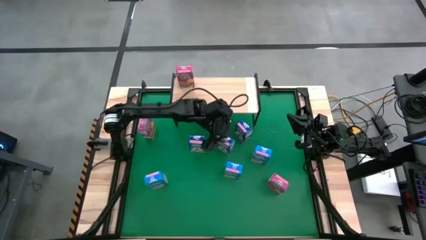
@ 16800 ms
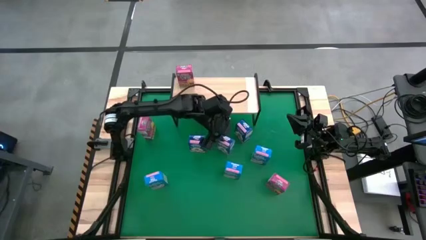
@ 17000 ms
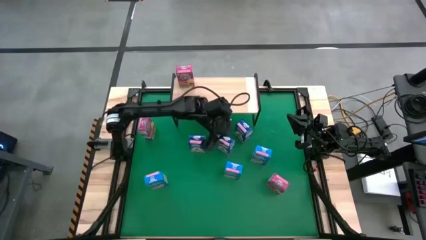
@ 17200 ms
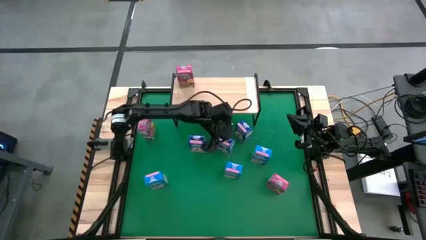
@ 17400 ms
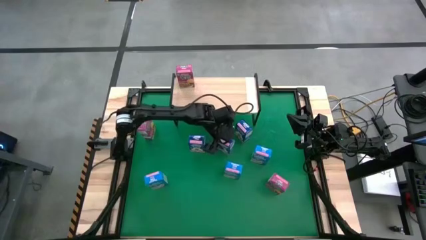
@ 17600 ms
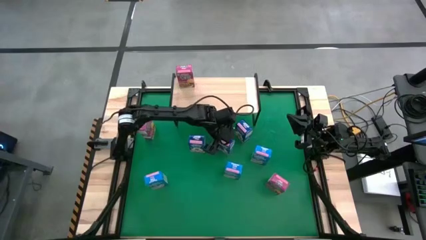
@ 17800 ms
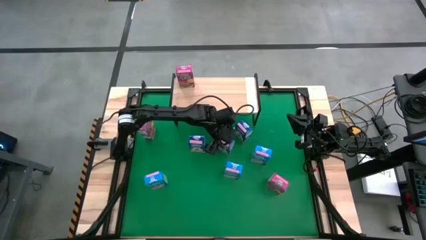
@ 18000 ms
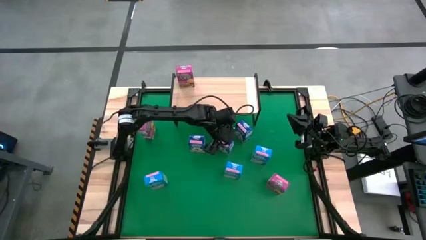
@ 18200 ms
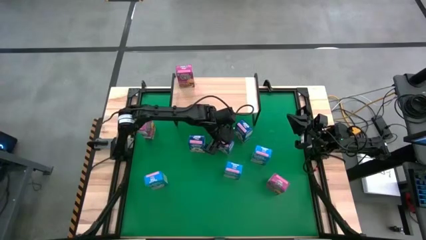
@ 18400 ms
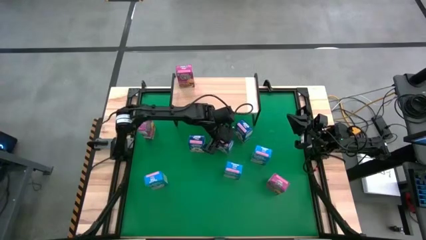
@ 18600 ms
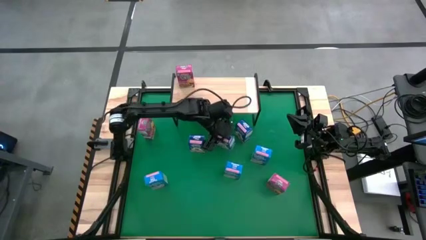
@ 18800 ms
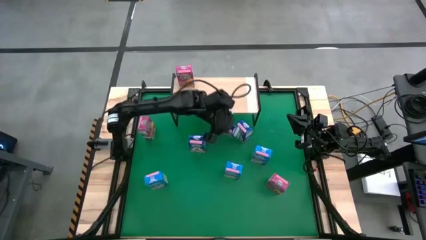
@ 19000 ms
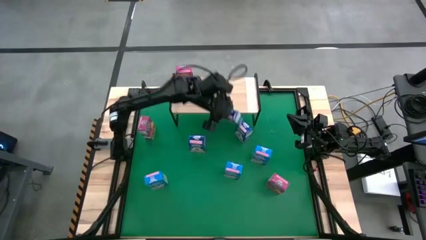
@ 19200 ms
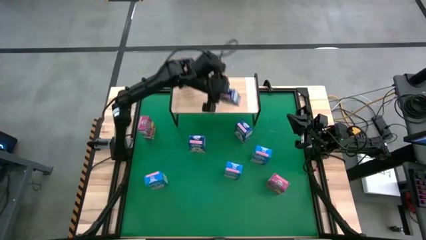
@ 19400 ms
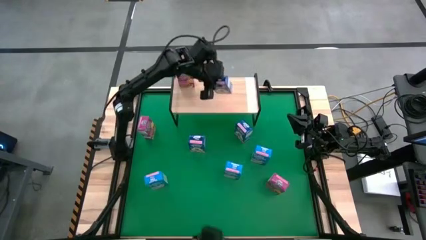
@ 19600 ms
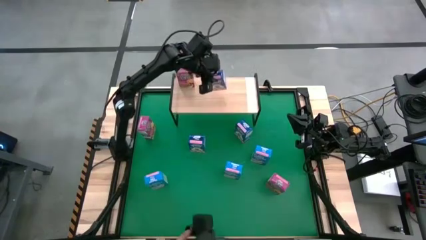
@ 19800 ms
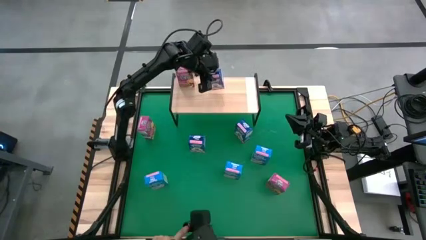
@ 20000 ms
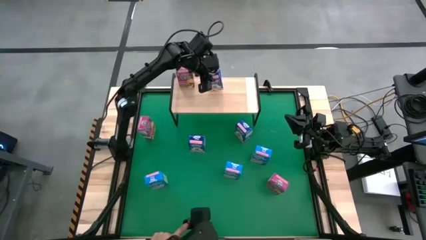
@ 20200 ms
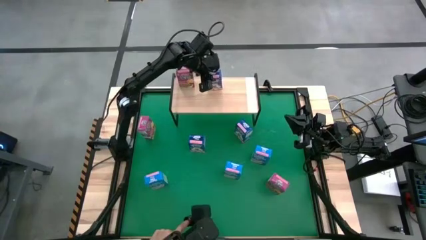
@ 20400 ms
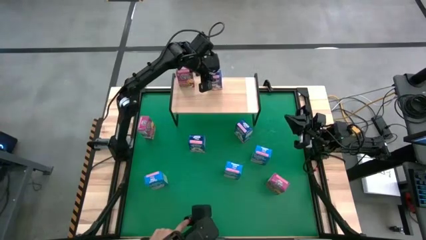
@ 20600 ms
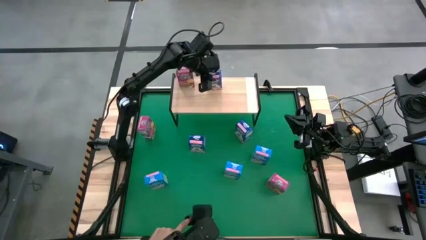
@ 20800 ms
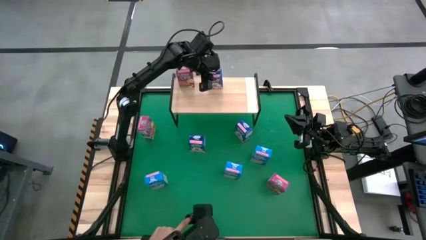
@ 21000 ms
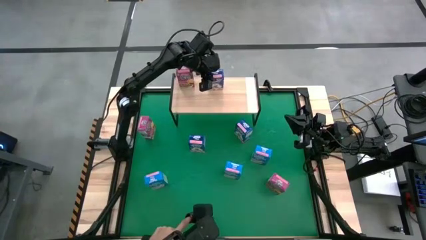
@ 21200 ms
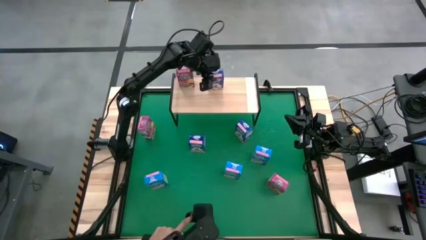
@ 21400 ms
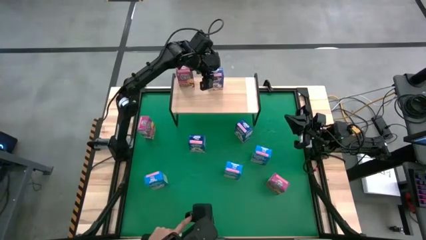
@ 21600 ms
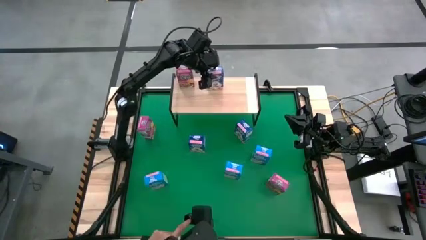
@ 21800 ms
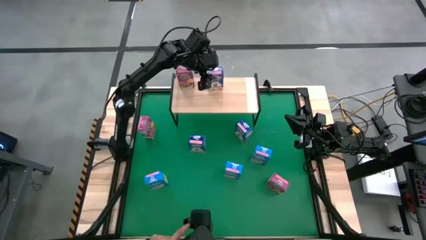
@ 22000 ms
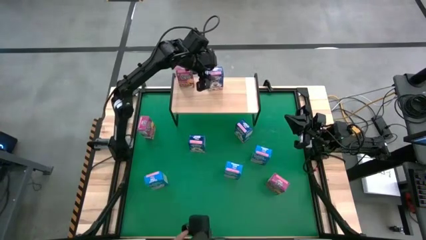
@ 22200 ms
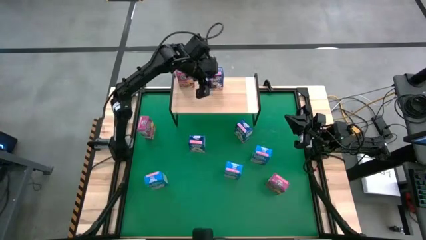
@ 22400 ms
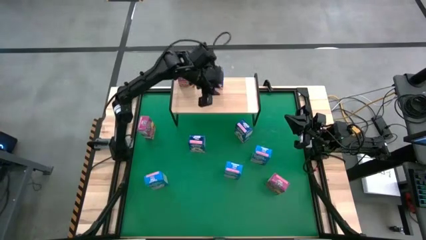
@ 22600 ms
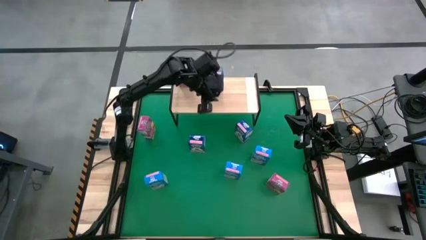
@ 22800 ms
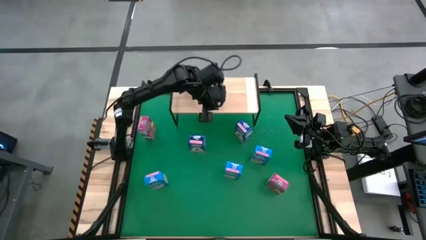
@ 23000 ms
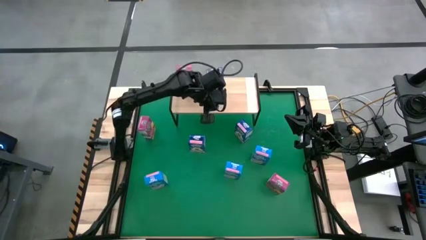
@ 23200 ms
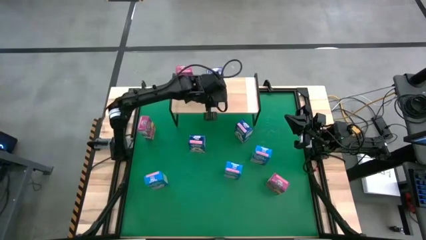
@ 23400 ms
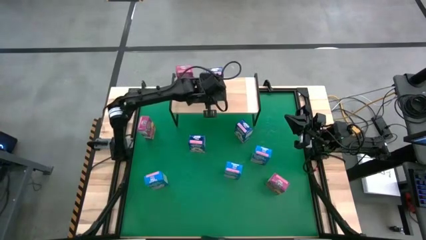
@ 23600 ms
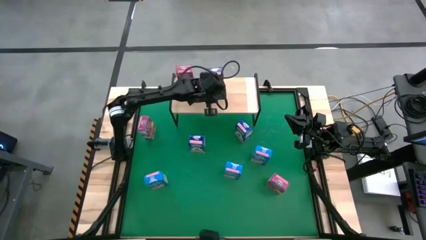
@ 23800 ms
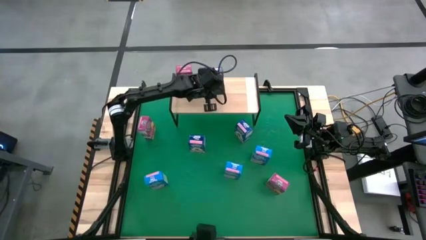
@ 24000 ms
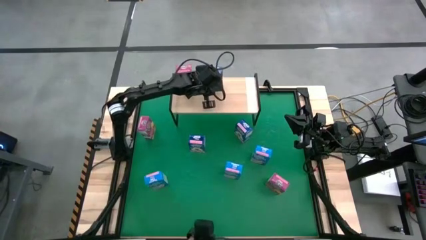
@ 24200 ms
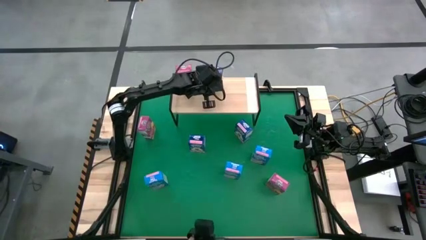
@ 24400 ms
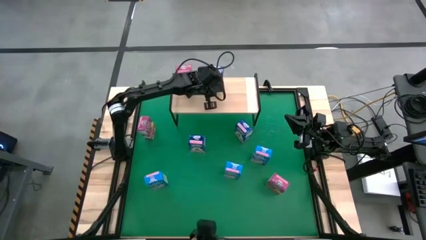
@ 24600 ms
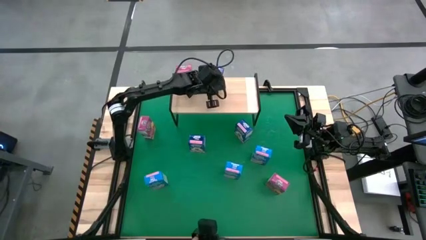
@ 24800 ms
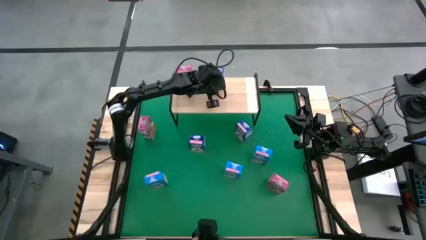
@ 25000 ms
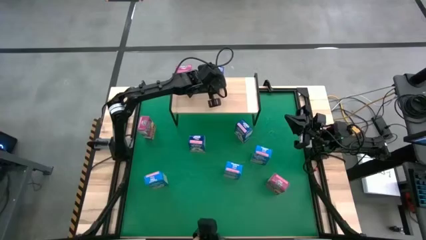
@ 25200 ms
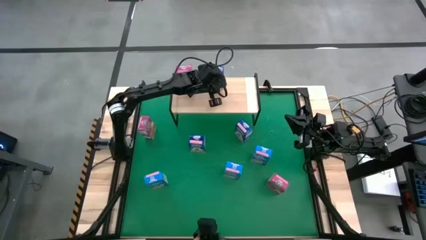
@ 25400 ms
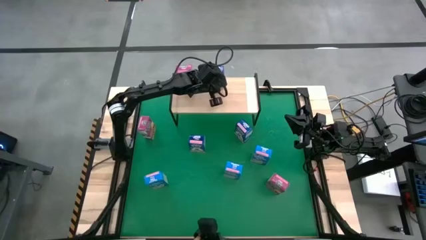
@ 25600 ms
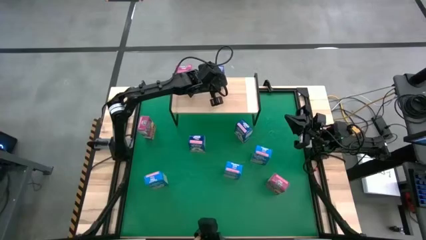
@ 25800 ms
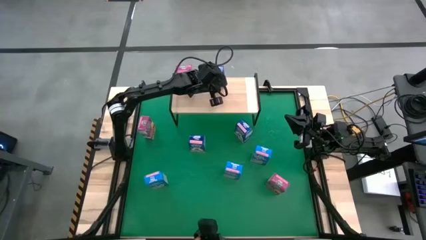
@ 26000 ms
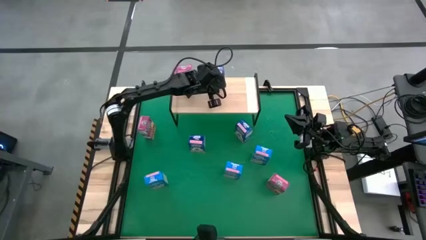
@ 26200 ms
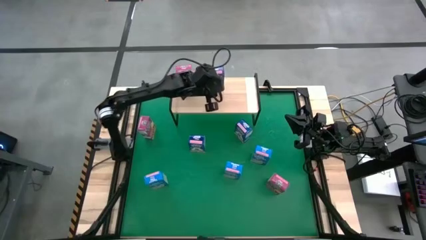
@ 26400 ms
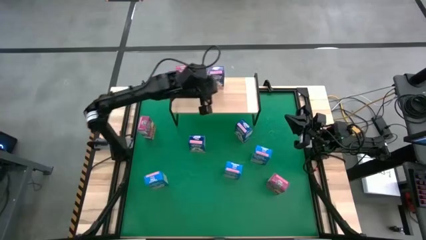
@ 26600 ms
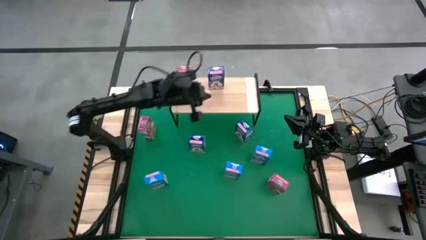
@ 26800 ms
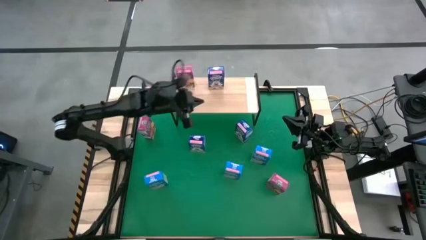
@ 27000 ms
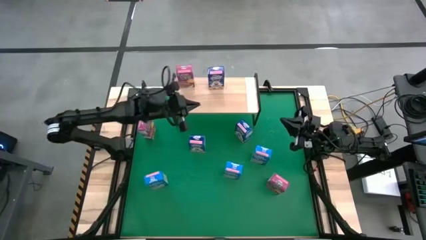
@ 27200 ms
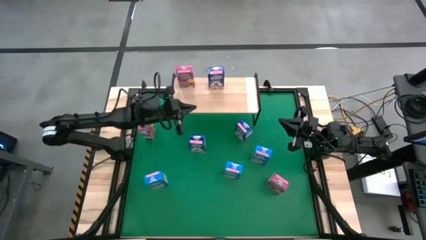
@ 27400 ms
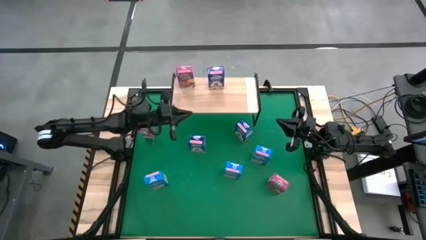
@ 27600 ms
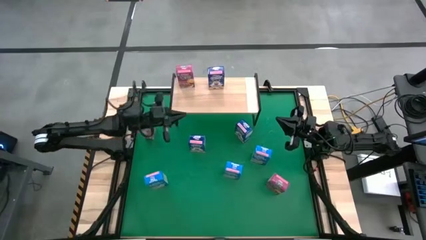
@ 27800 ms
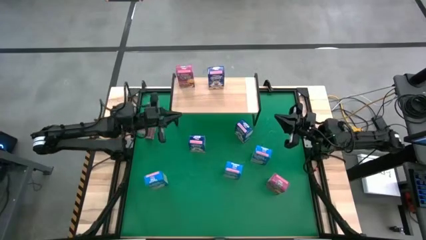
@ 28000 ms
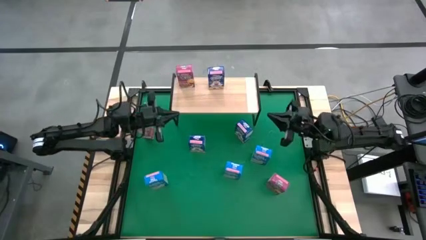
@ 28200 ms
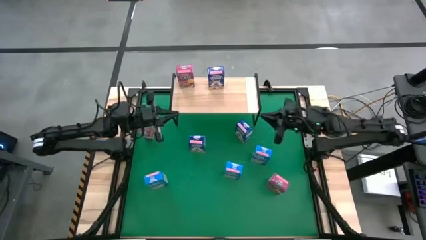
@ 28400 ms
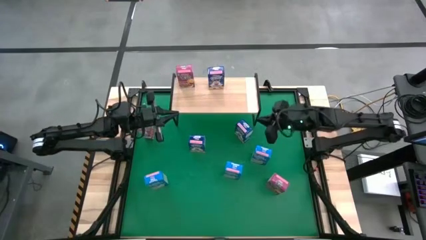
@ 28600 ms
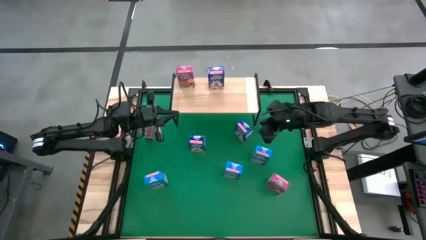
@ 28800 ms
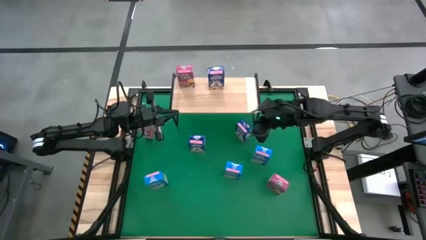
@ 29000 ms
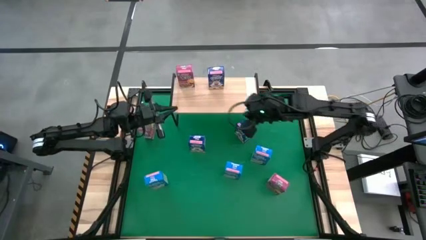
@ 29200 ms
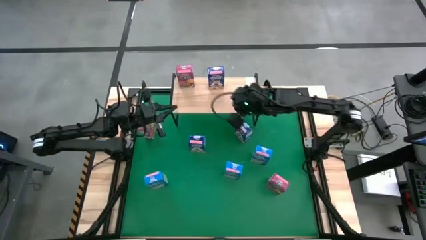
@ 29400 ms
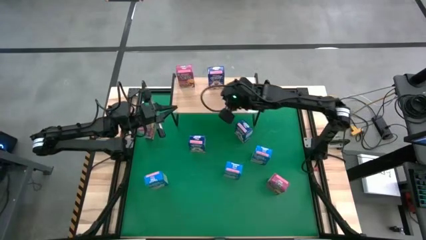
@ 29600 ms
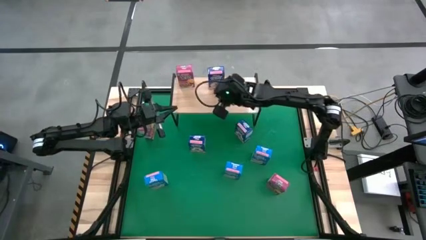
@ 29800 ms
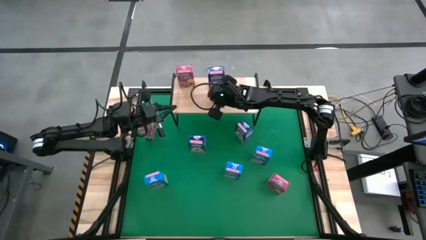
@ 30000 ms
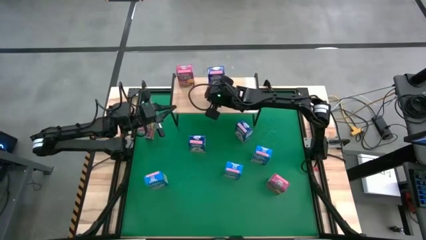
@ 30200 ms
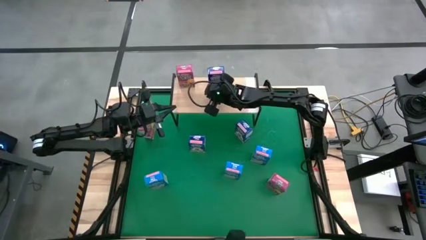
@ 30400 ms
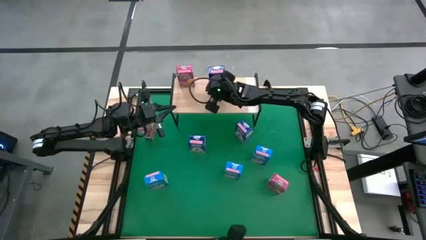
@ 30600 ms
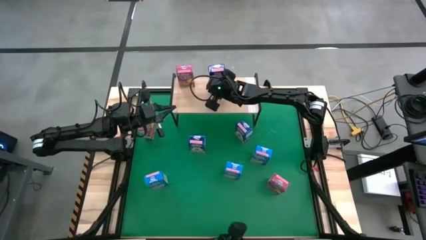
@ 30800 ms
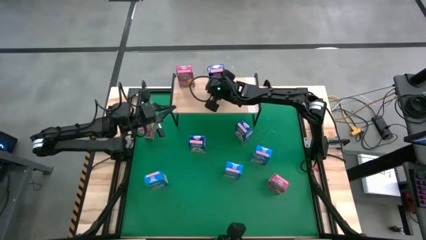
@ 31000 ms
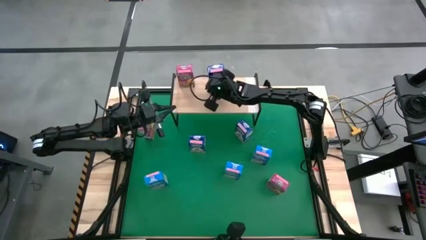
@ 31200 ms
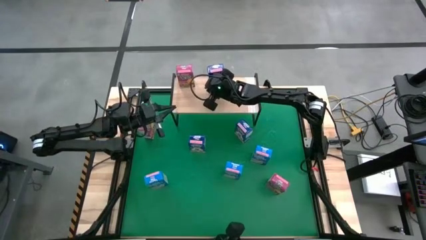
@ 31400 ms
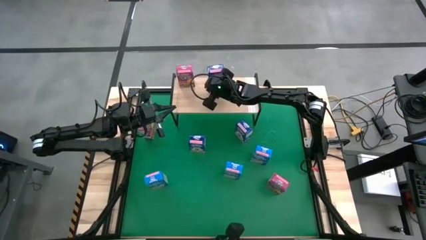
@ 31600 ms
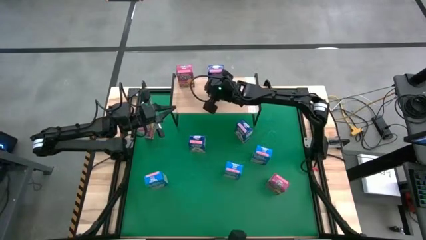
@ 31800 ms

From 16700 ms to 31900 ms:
Task: Stack cereal on shelf
Put the middle blue cereal box on the shelf
